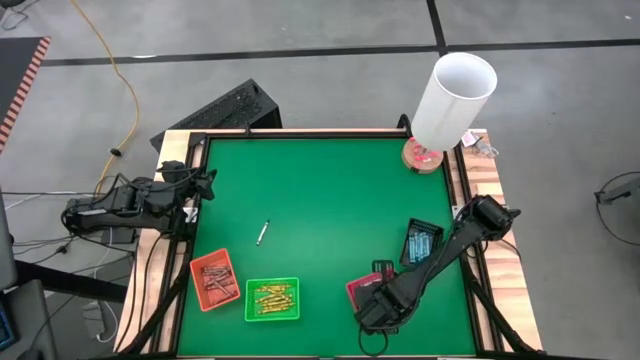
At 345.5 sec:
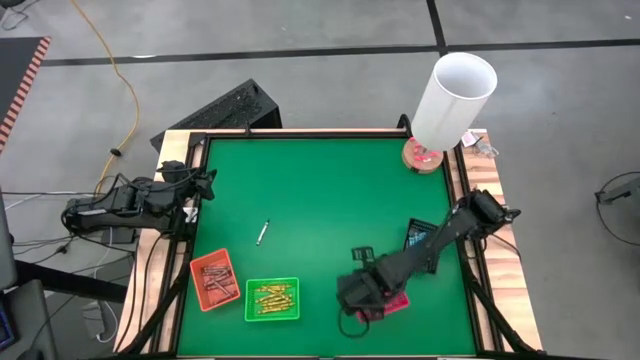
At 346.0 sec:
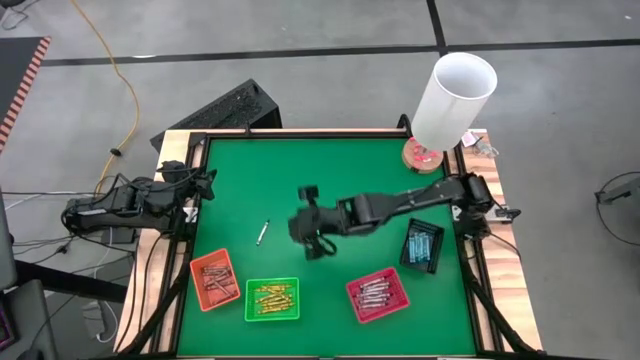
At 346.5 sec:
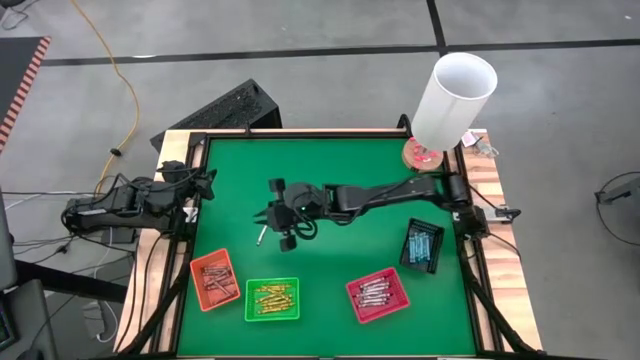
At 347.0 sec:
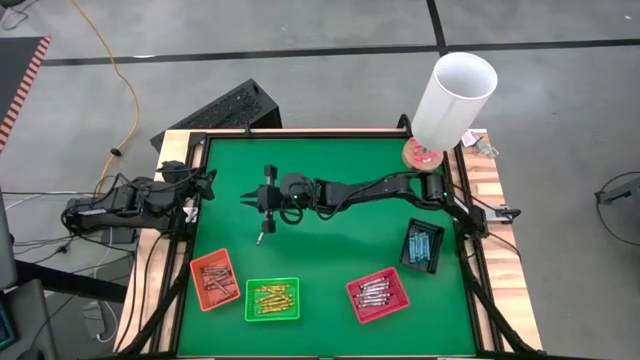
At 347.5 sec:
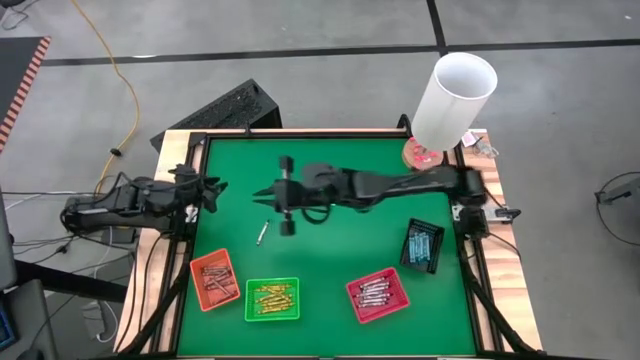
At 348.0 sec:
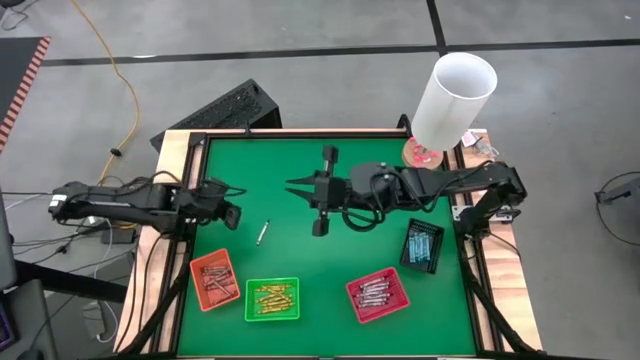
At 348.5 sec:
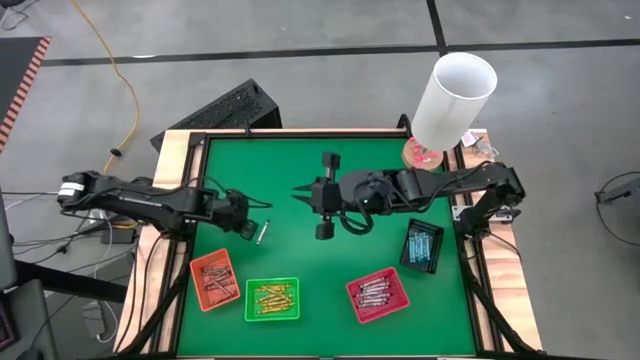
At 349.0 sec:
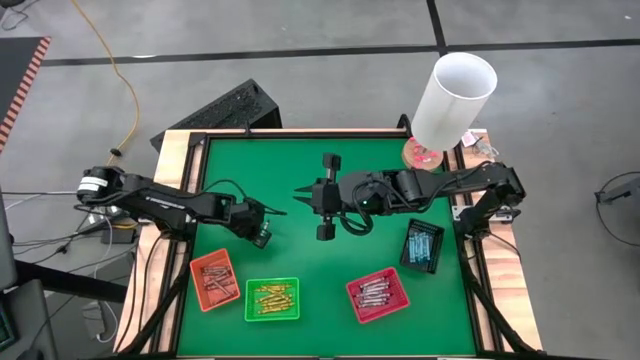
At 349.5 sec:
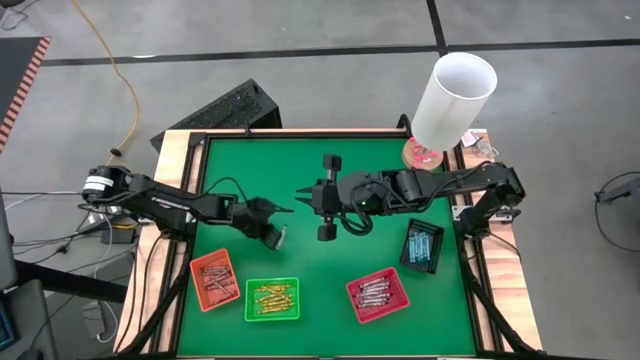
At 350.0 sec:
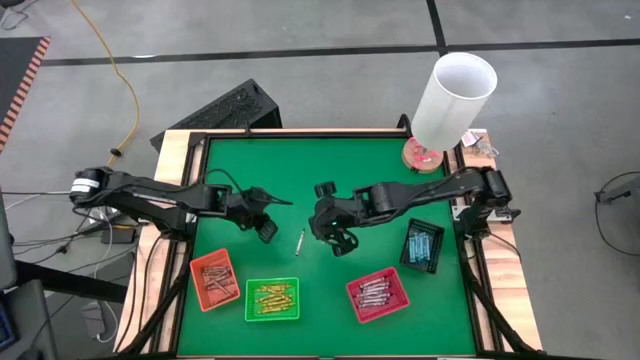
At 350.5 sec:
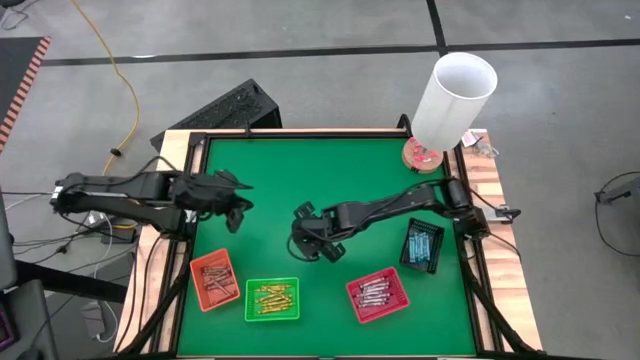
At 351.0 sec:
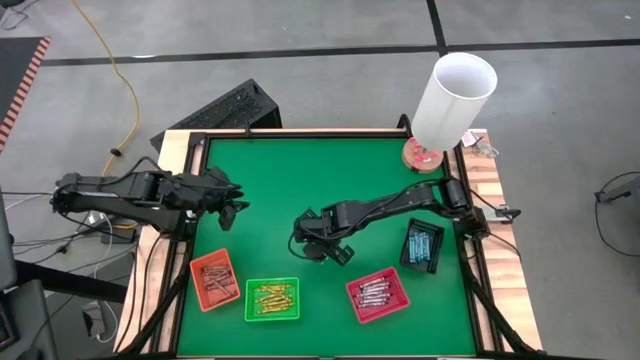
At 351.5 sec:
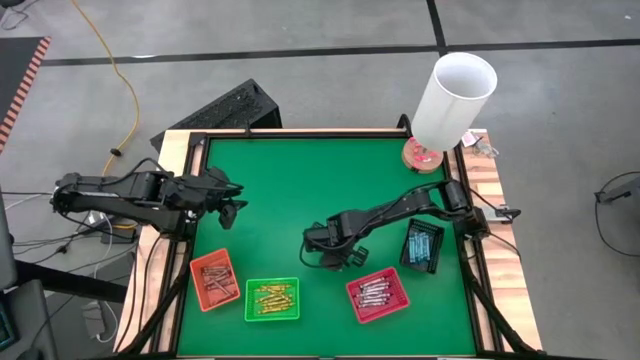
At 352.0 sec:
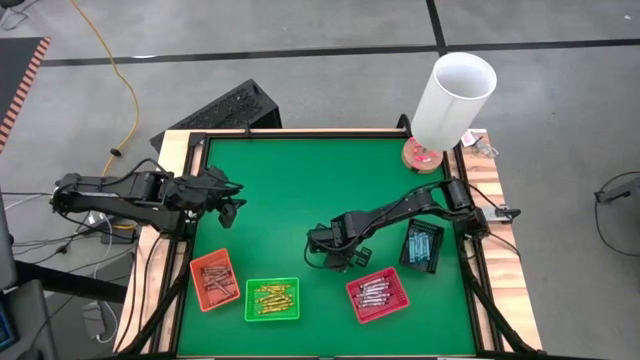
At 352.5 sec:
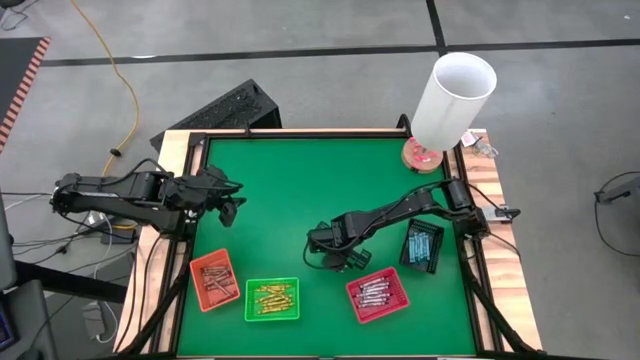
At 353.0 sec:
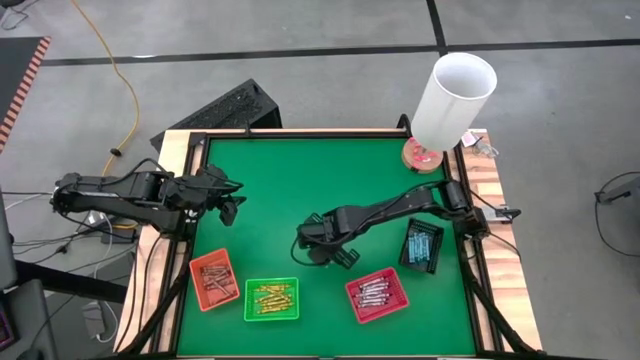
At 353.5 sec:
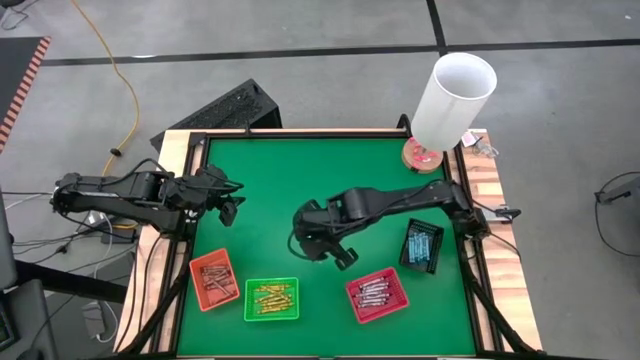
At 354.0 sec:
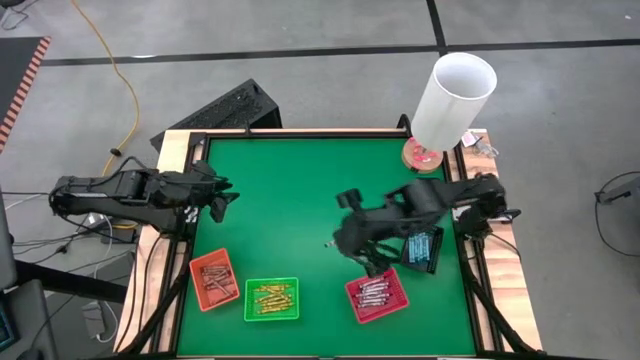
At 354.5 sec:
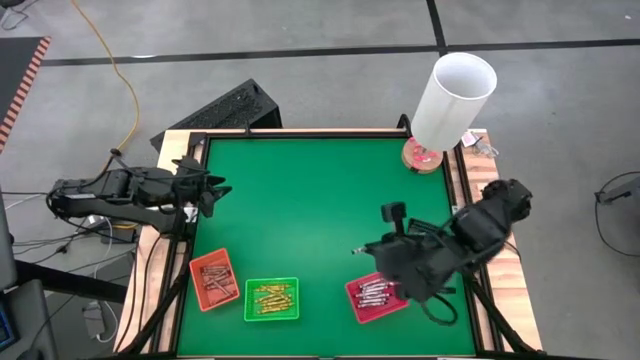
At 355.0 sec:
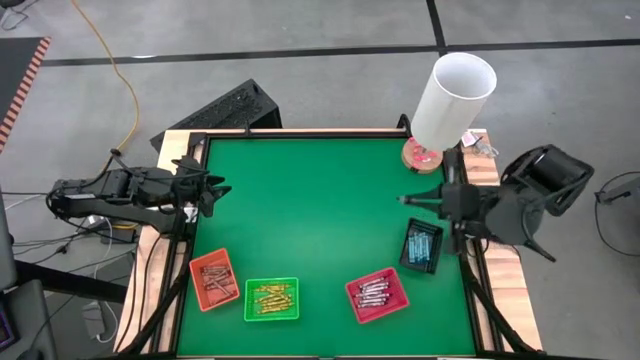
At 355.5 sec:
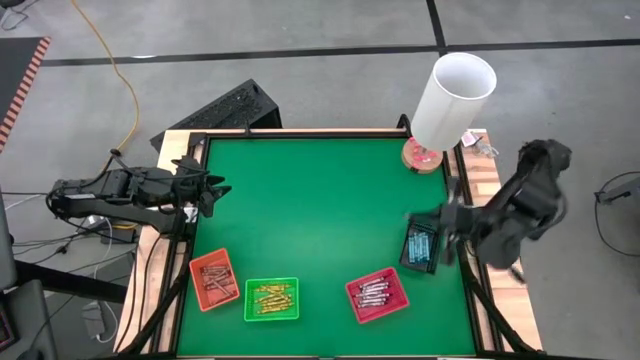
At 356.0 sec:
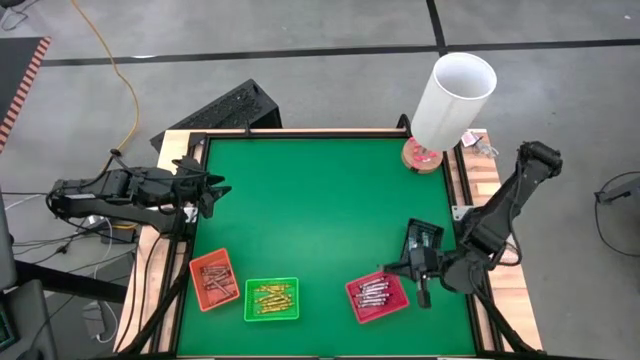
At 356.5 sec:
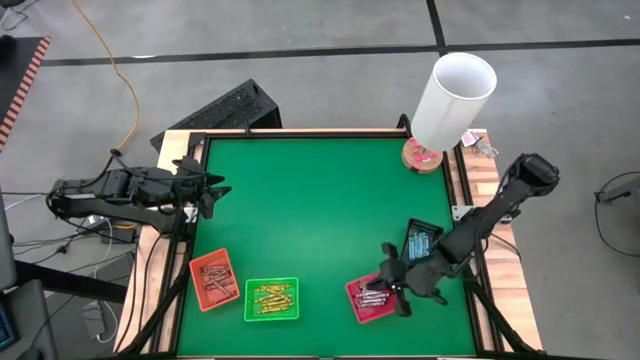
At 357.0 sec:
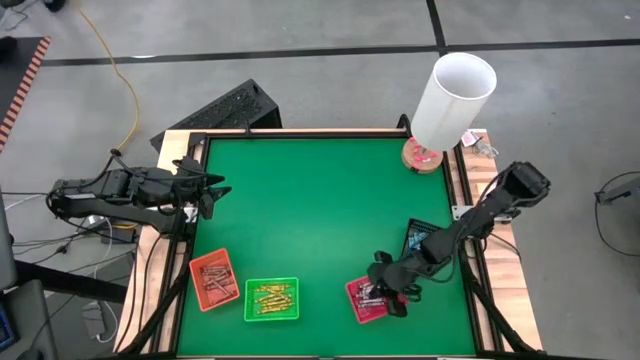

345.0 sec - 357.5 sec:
Task: Sort crayons
Put the black crayon into the red bin

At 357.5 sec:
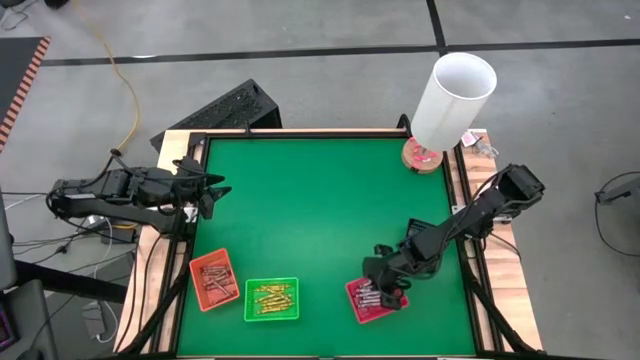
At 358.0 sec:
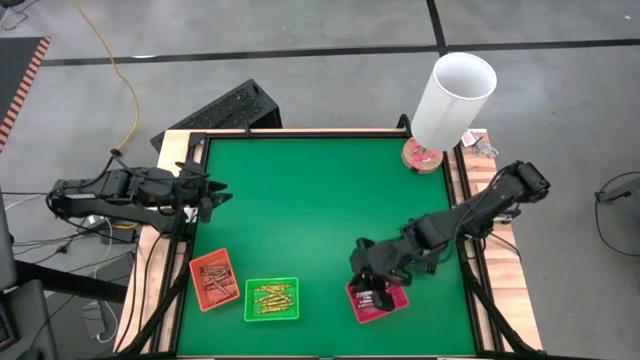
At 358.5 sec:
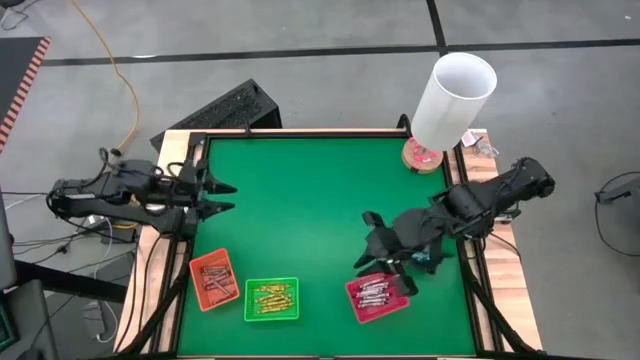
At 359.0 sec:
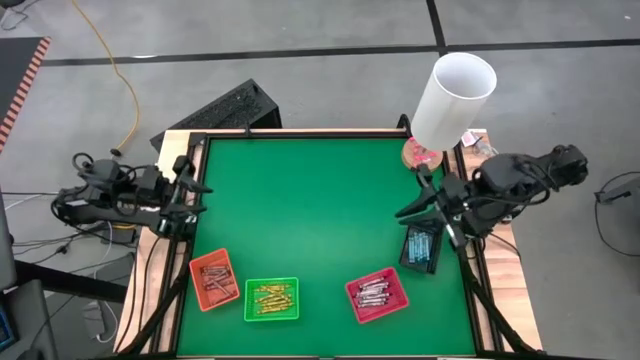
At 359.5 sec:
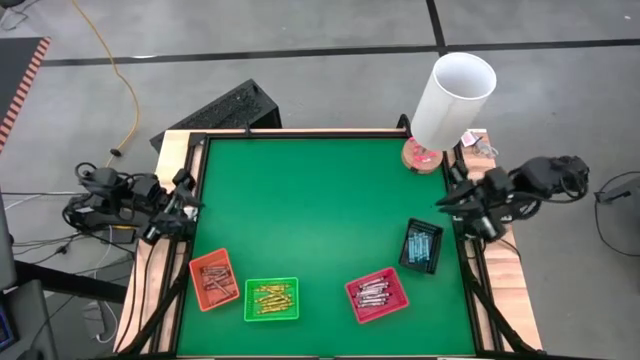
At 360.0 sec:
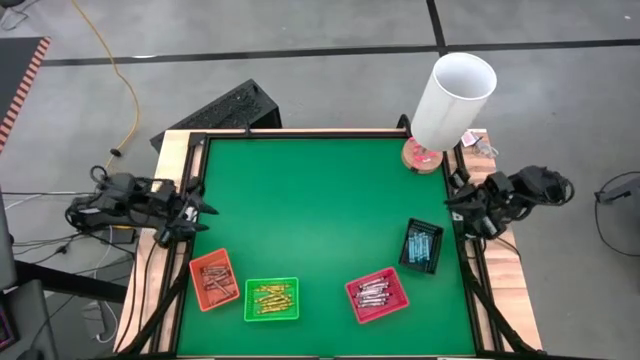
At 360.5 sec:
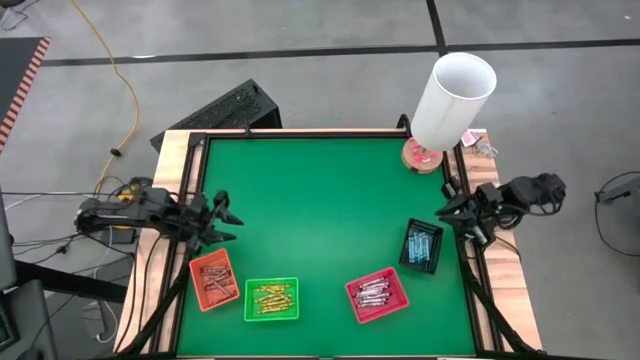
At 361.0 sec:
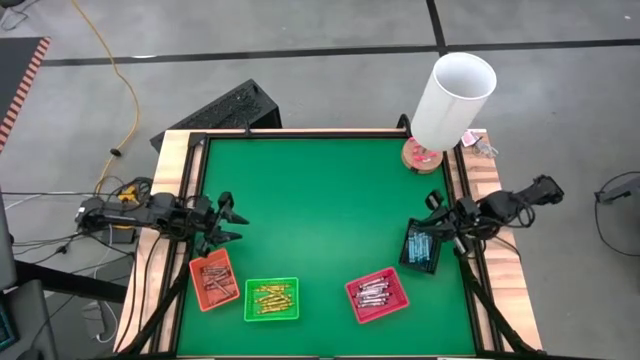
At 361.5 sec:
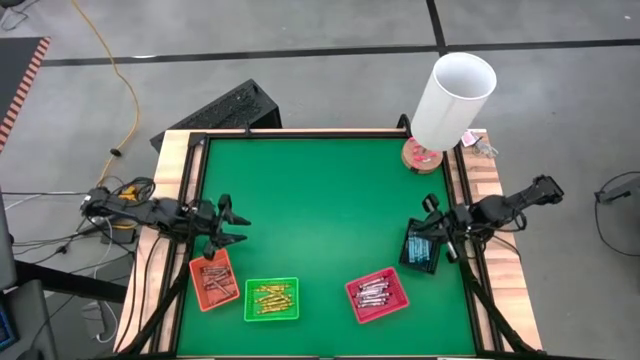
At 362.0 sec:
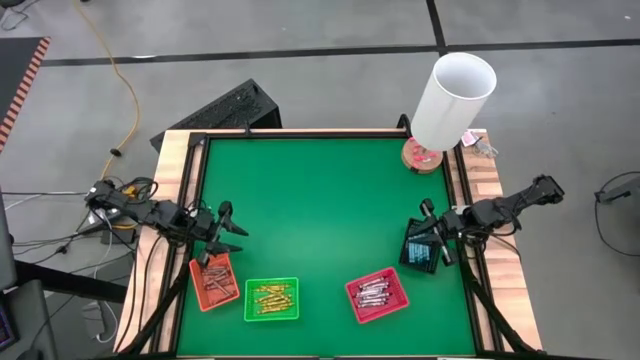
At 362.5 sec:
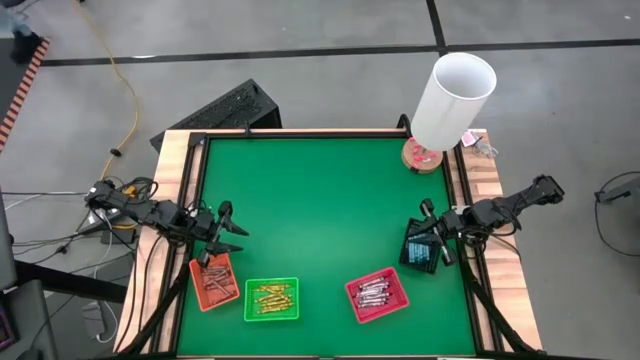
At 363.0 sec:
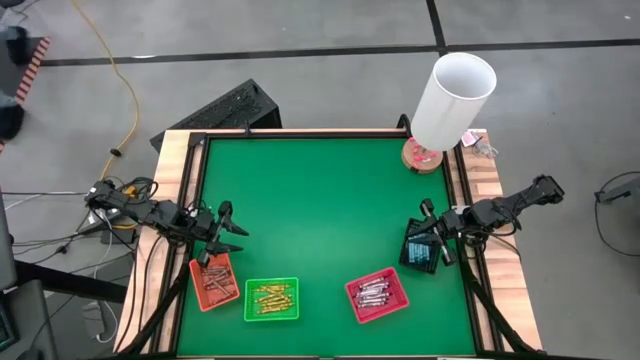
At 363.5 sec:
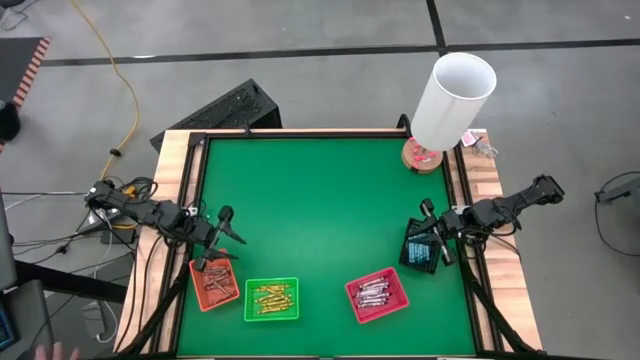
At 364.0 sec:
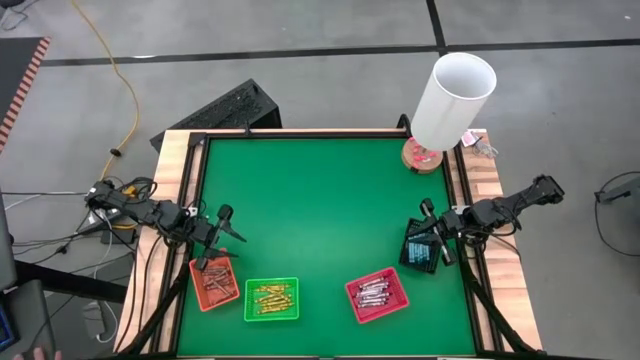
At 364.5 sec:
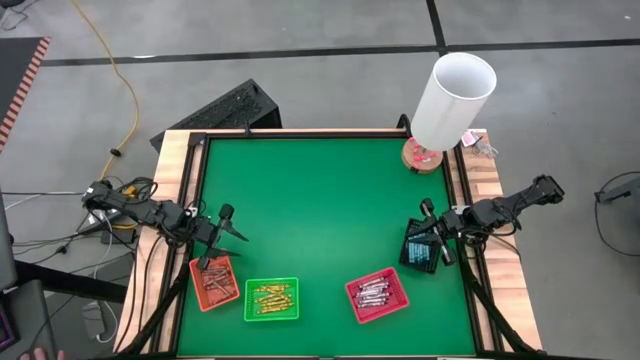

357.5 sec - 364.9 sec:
Return to Home Position
